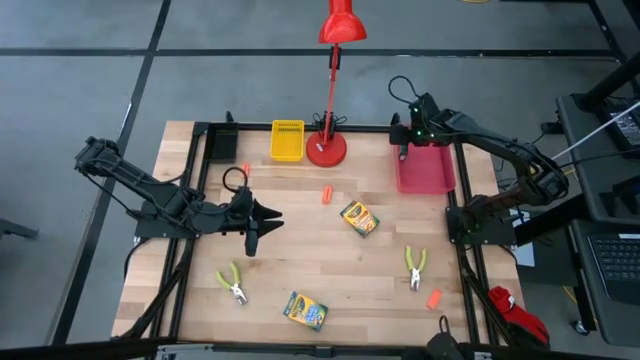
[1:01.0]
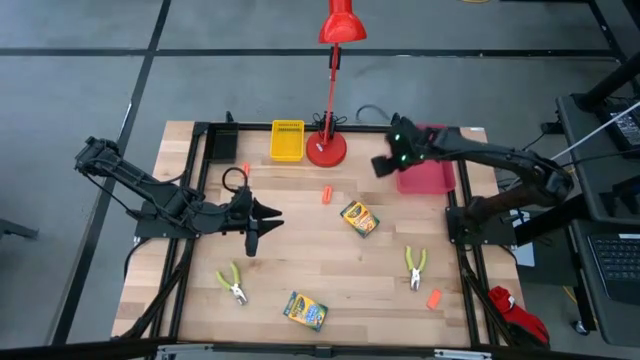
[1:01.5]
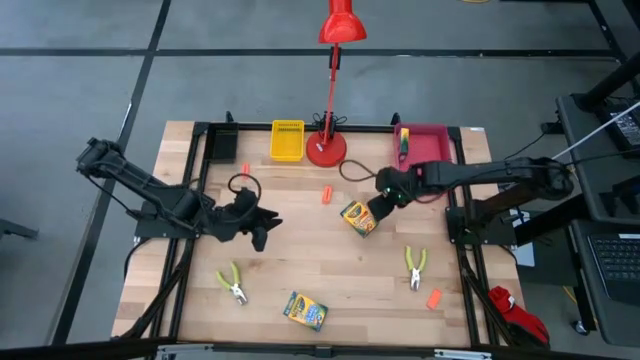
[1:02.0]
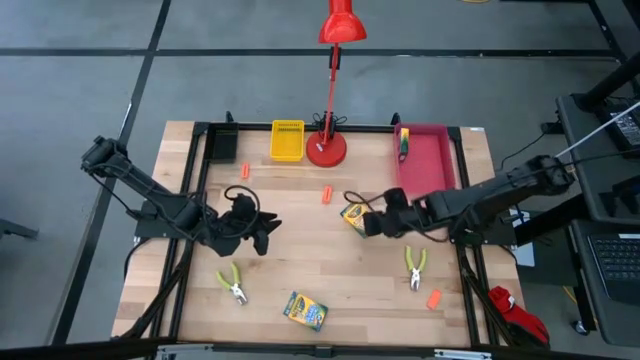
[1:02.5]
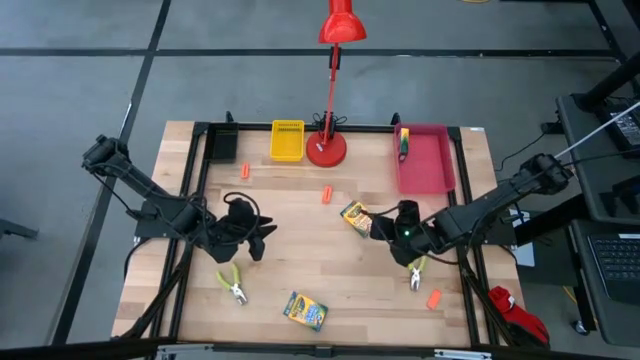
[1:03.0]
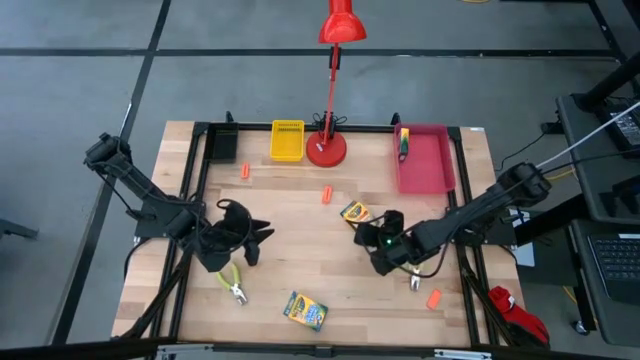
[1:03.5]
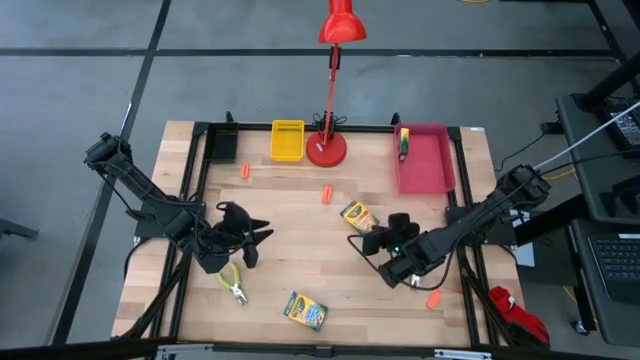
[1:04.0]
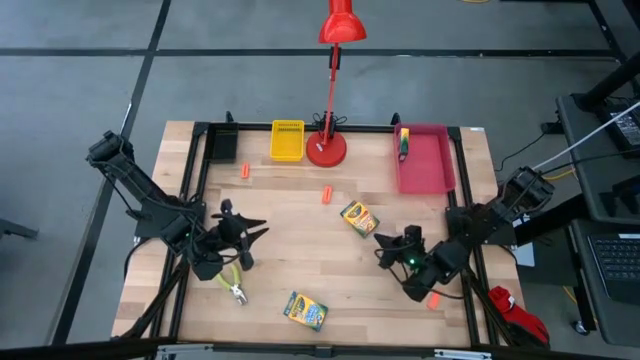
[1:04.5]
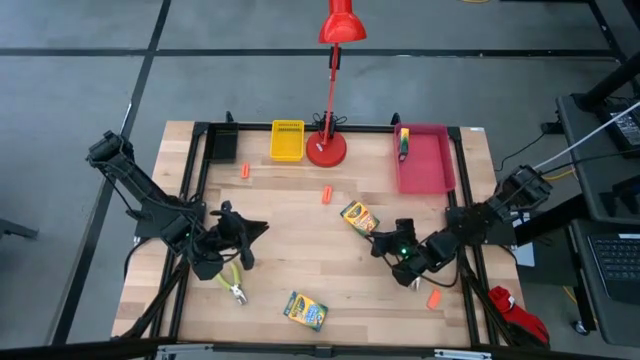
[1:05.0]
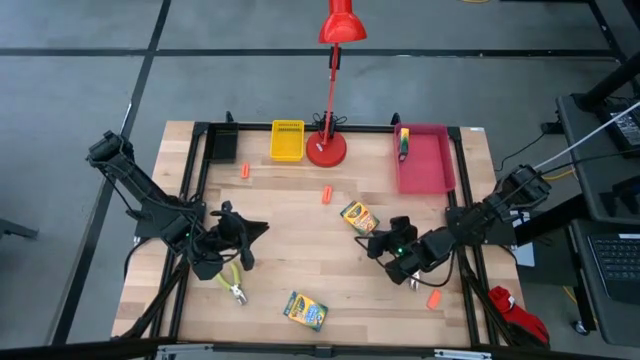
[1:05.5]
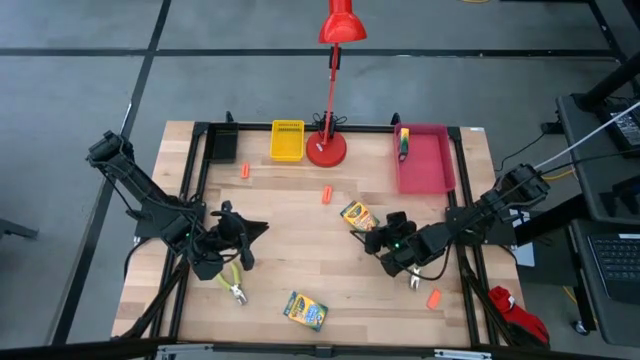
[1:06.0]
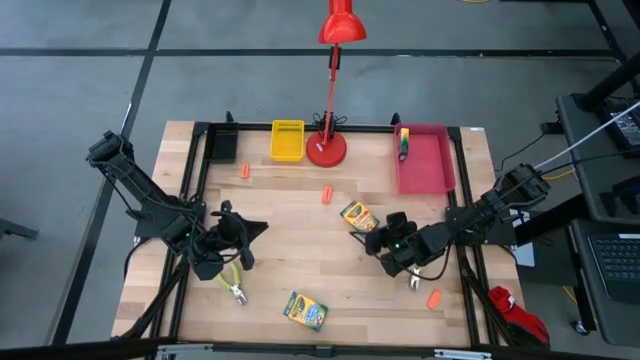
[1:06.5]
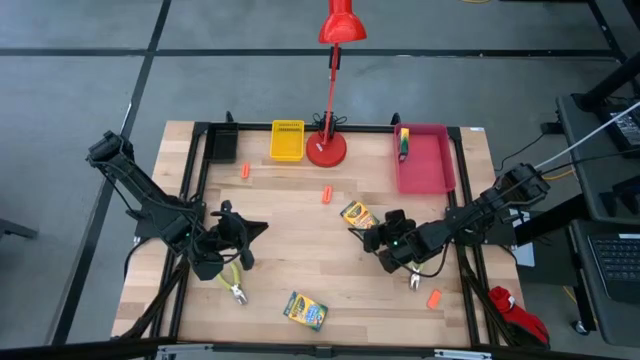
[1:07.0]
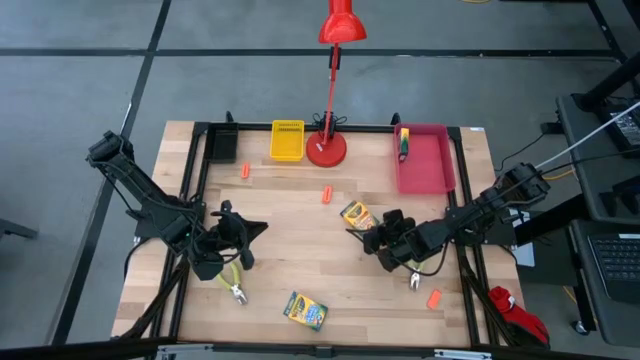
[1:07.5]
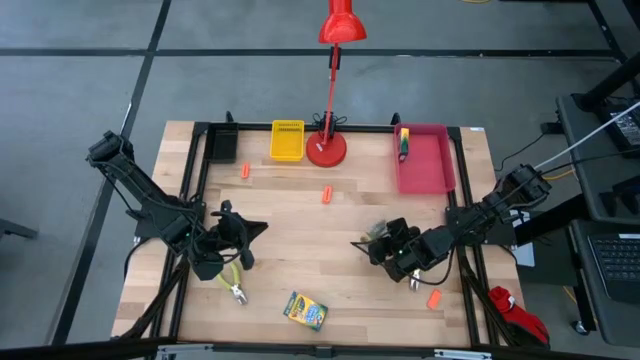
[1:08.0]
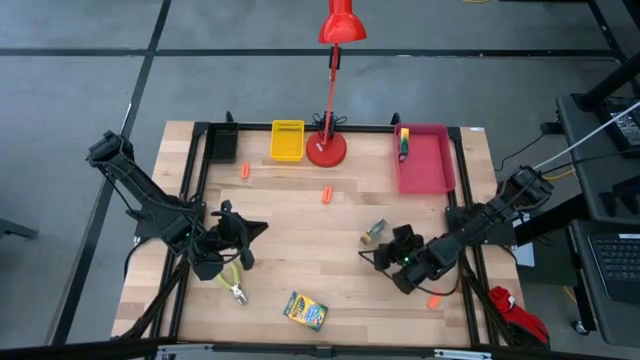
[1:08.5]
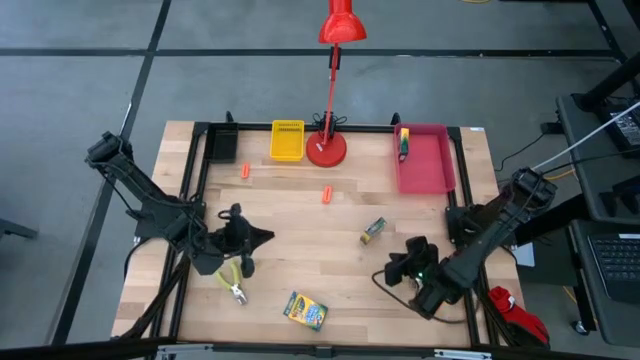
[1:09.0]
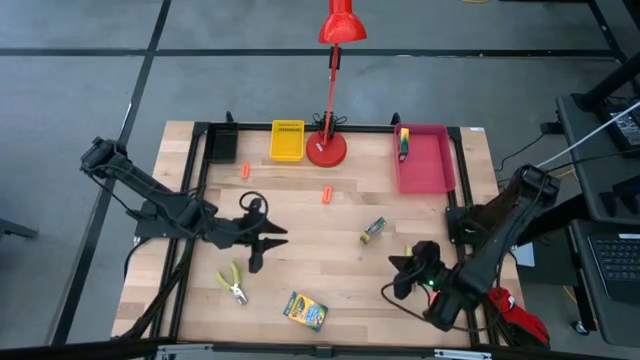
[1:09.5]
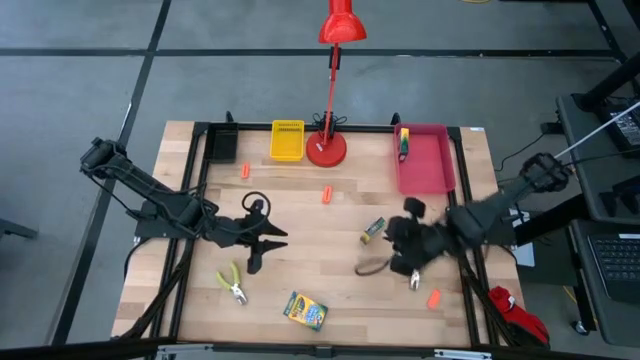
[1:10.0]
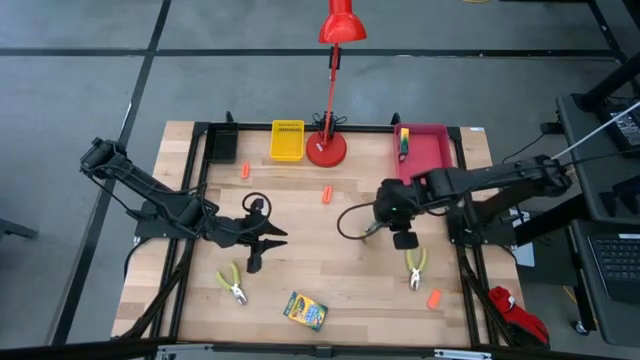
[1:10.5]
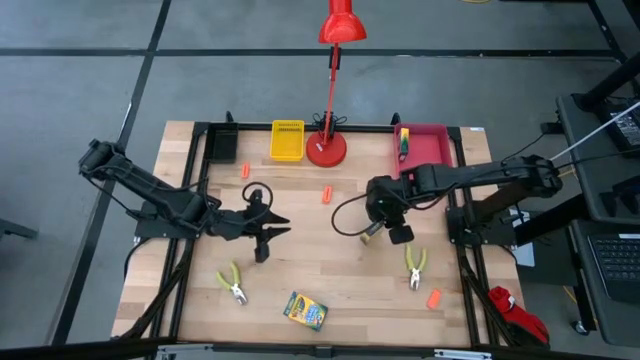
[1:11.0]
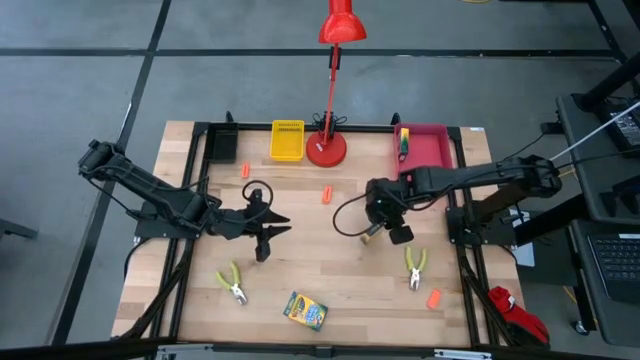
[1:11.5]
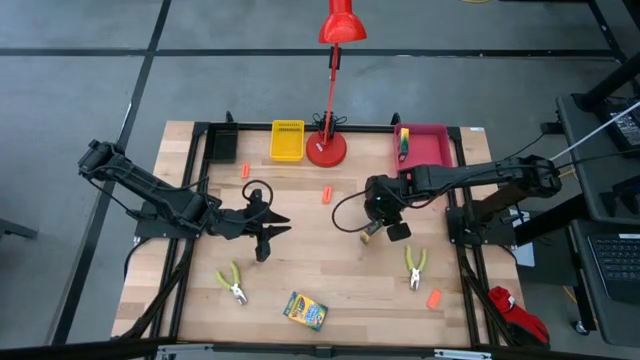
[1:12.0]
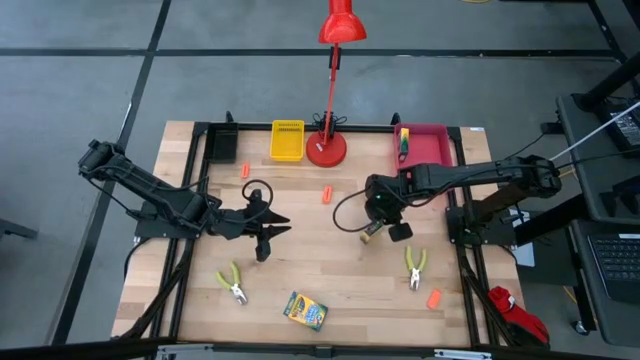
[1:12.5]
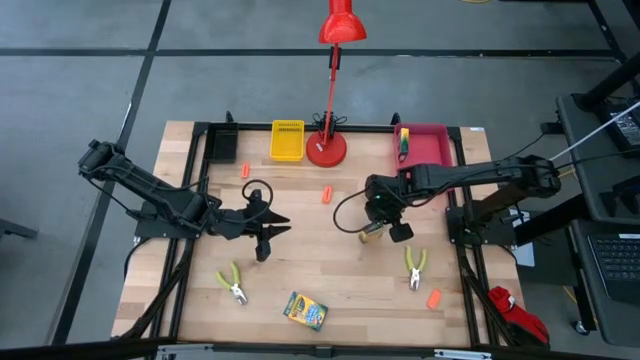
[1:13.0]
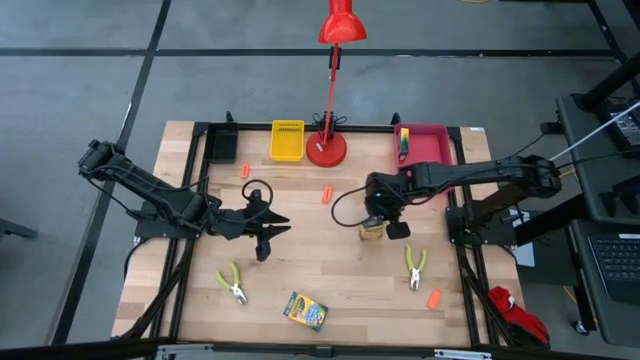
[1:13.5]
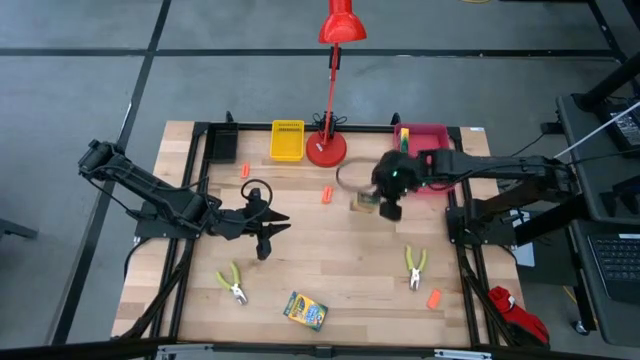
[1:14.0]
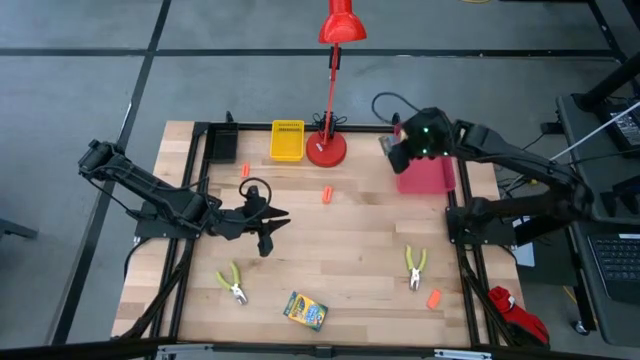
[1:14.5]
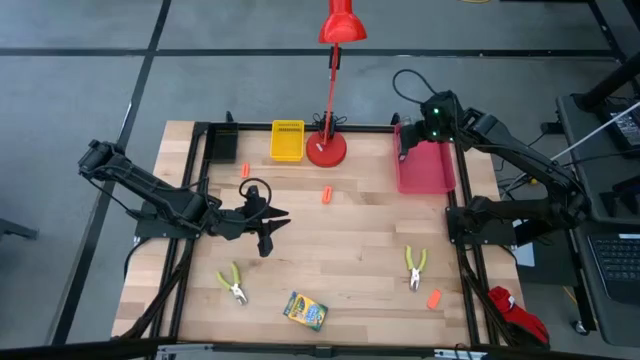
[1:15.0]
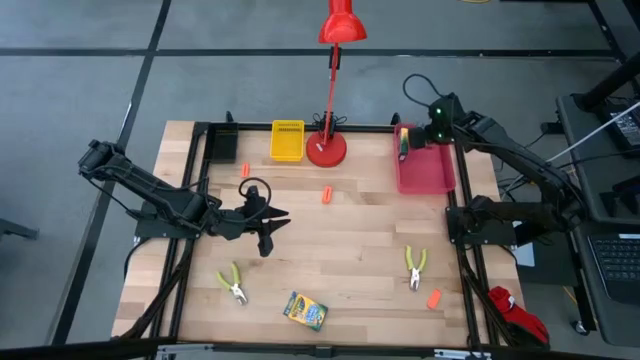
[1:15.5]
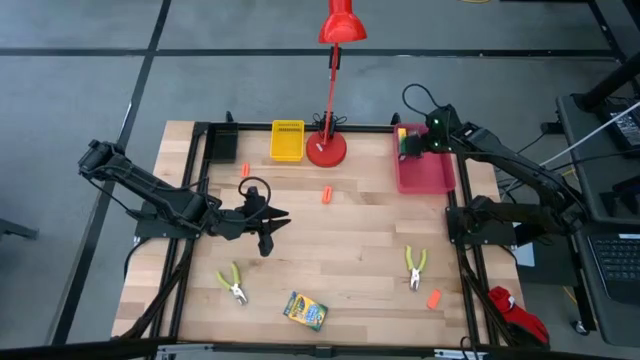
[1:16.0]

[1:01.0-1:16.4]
Task: Pick & Place School Supplies
Put the yellow crayon box into the red bin

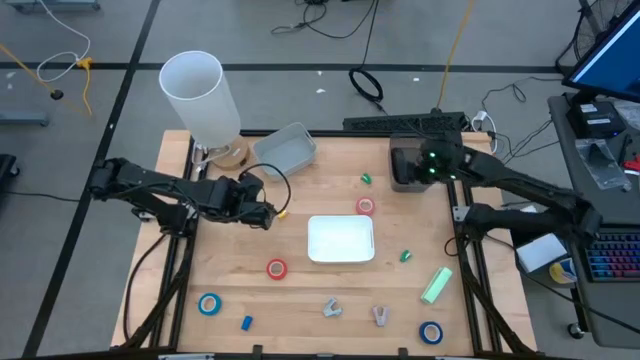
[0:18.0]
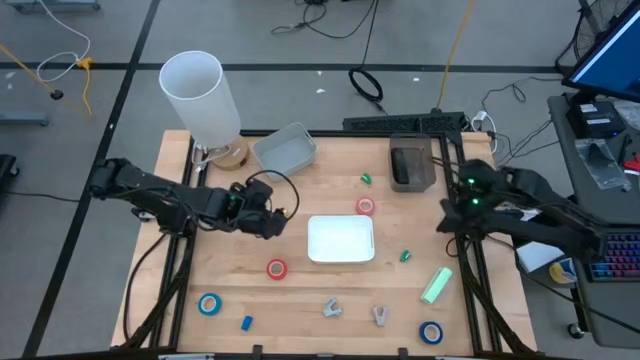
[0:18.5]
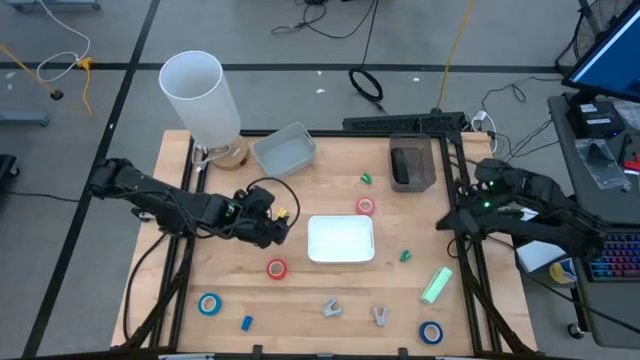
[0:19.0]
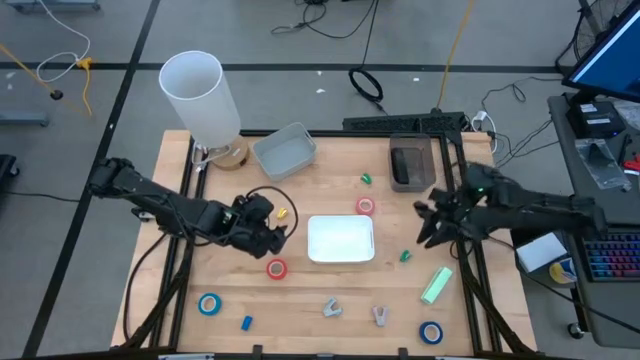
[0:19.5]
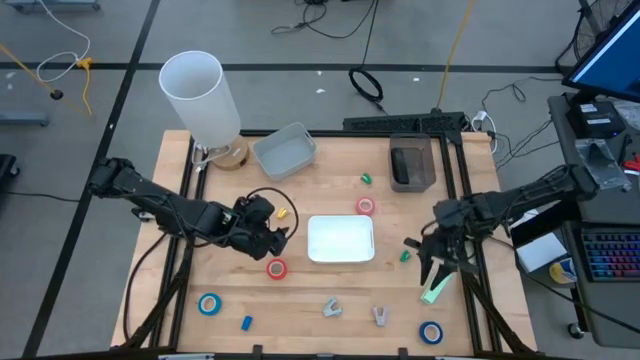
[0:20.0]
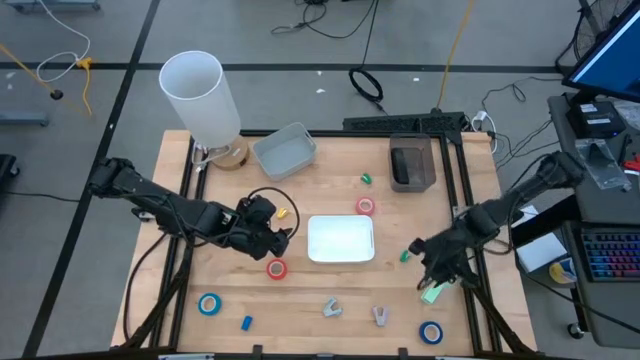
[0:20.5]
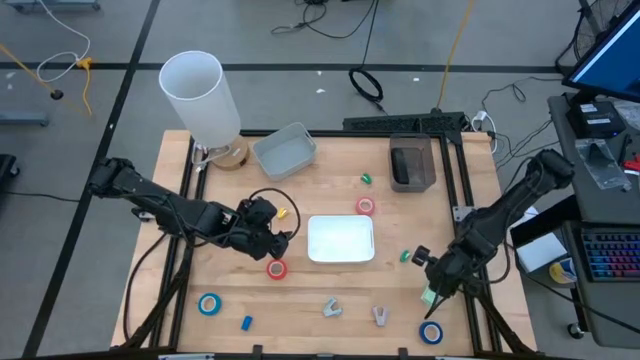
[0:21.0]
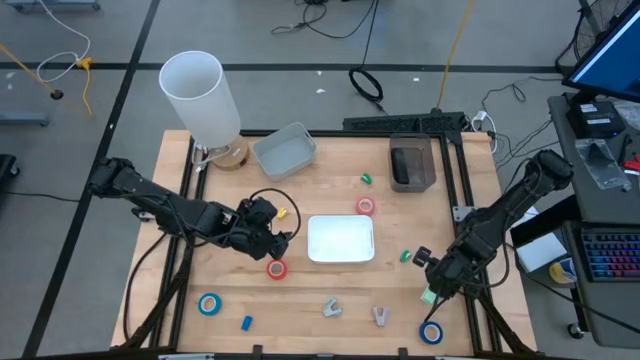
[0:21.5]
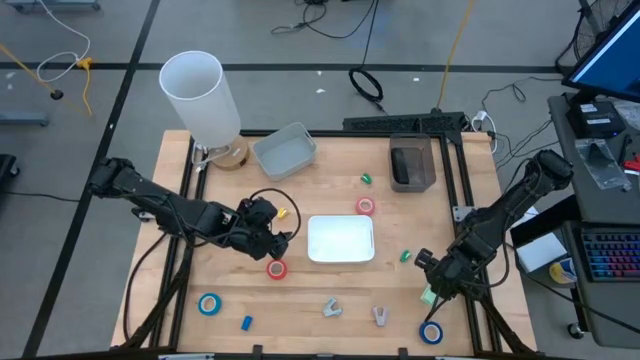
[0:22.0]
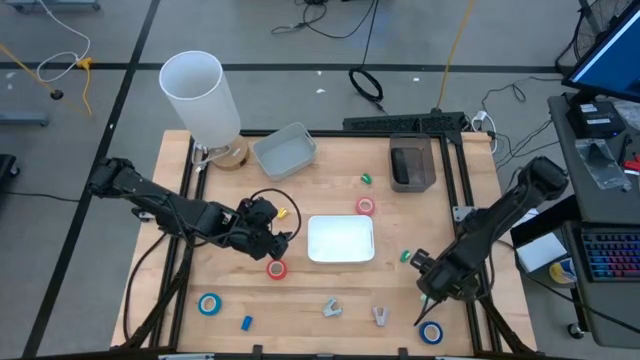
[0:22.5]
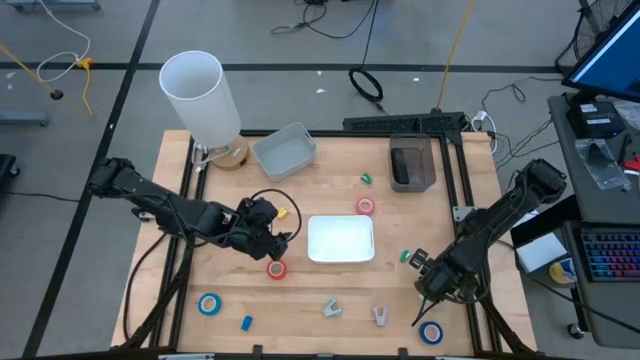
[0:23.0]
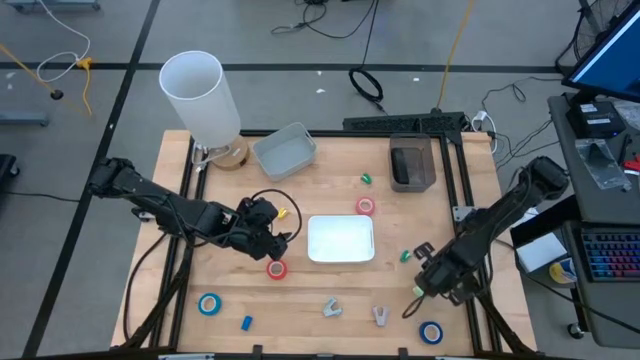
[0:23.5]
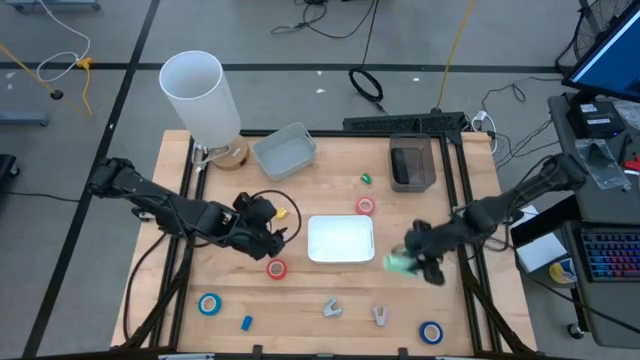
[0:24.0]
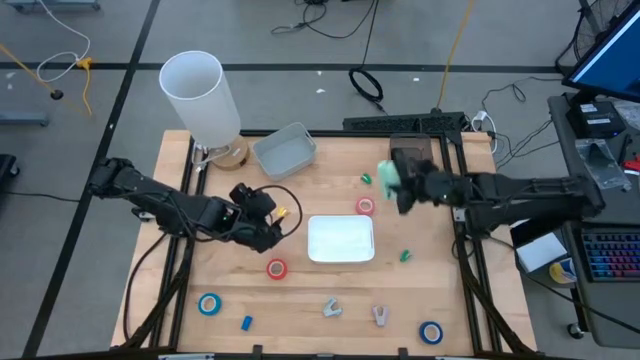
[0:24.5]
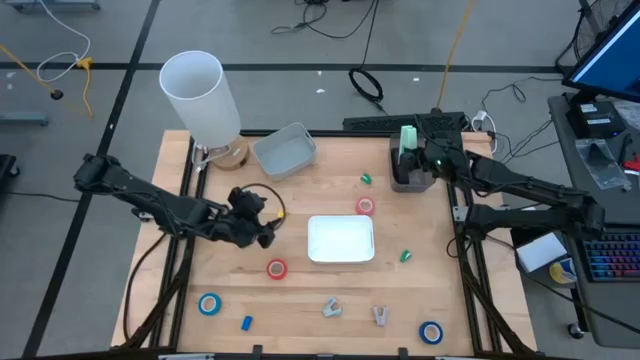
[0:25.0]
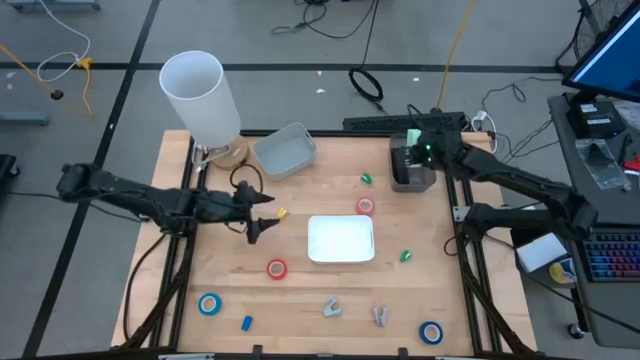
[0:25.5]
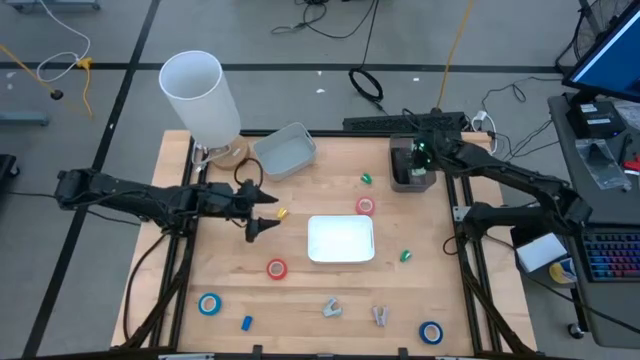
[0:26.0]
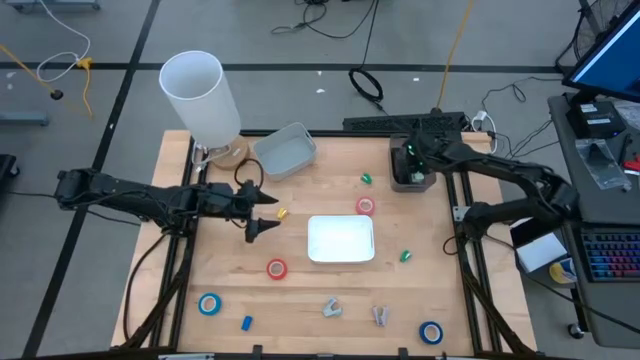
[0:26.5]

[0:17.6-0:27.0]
Task: Pick and place Stapler, Stapler remover, tape
Put the green stapler into the black bin
